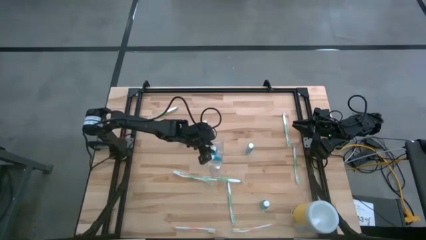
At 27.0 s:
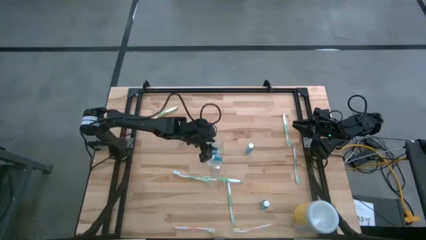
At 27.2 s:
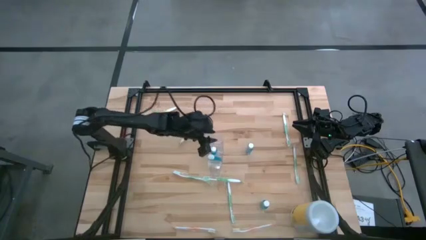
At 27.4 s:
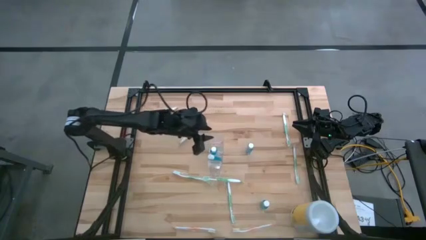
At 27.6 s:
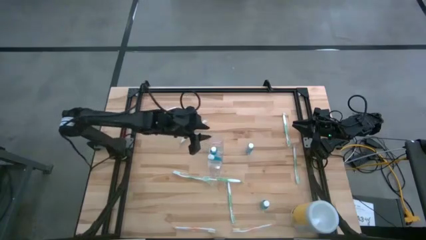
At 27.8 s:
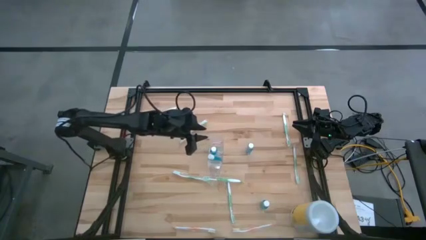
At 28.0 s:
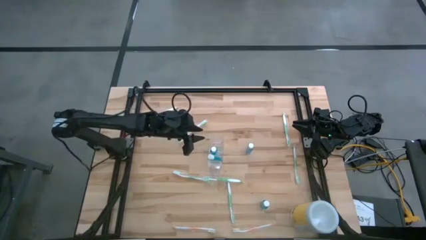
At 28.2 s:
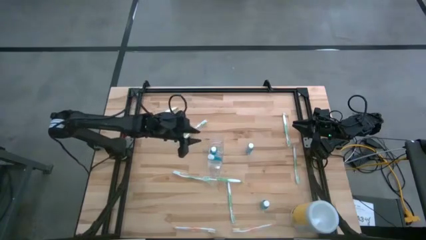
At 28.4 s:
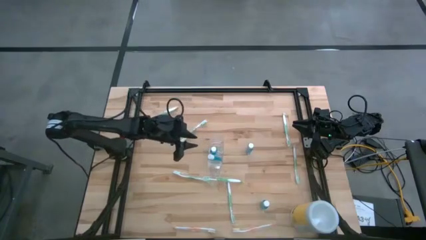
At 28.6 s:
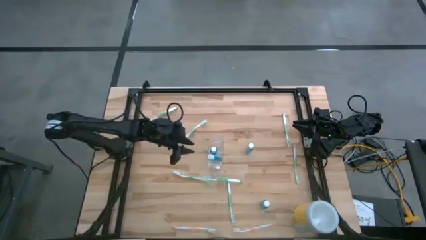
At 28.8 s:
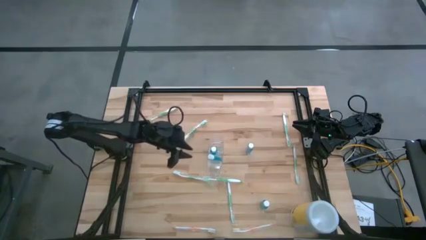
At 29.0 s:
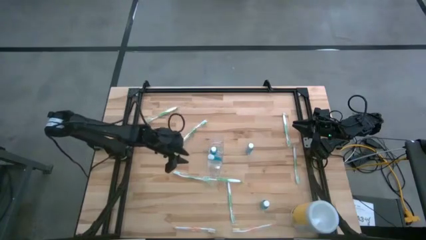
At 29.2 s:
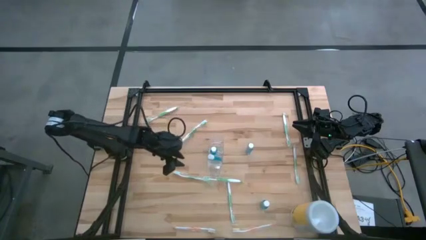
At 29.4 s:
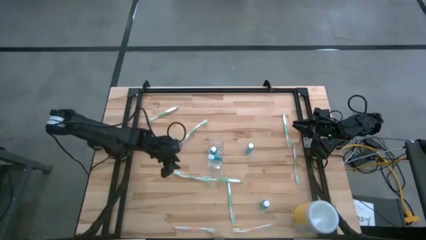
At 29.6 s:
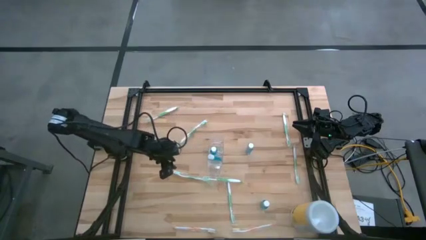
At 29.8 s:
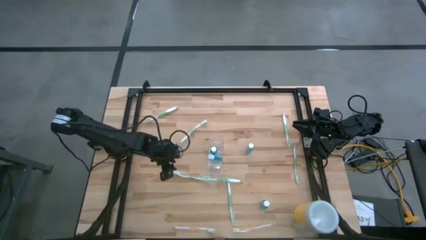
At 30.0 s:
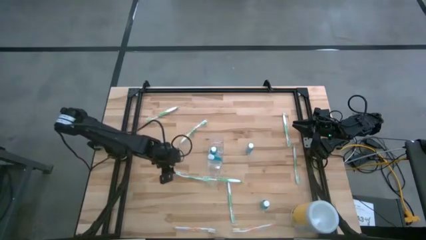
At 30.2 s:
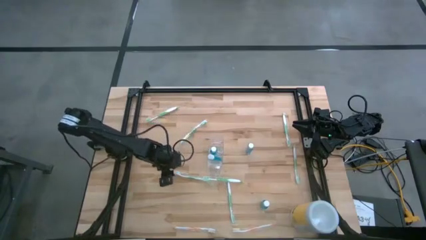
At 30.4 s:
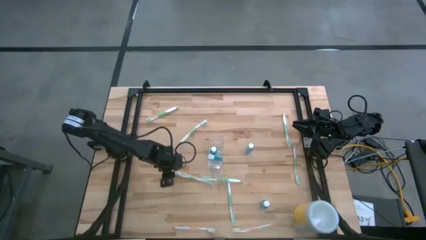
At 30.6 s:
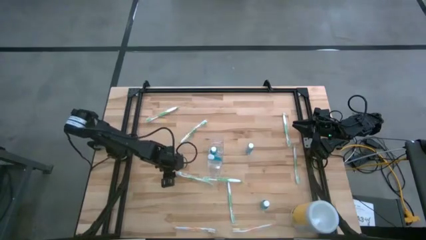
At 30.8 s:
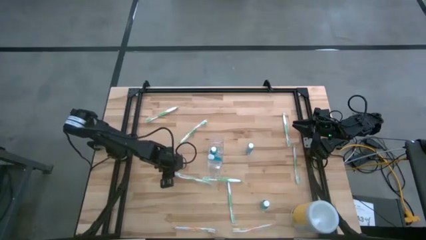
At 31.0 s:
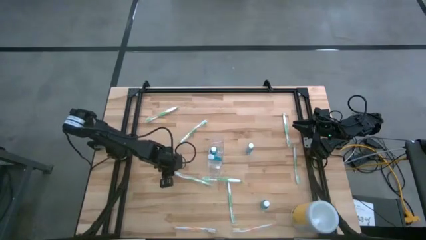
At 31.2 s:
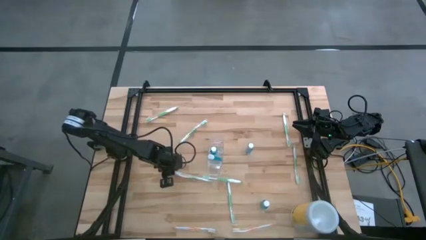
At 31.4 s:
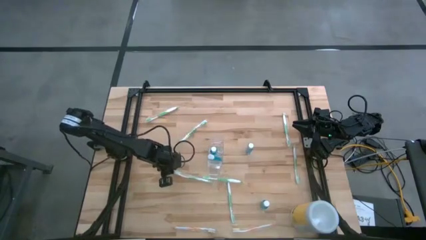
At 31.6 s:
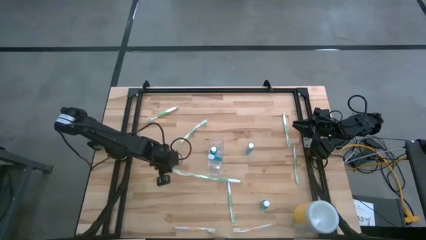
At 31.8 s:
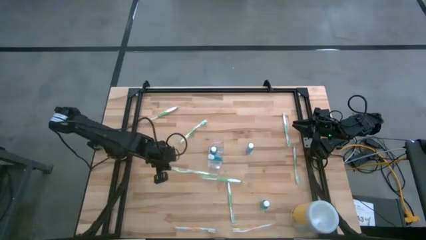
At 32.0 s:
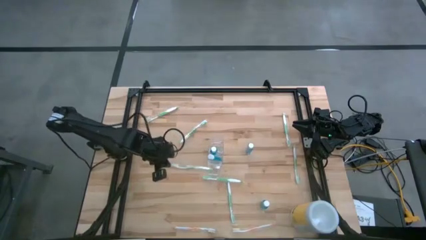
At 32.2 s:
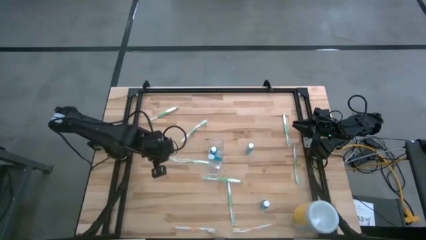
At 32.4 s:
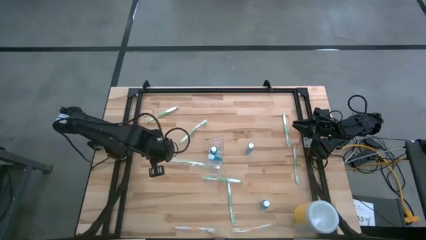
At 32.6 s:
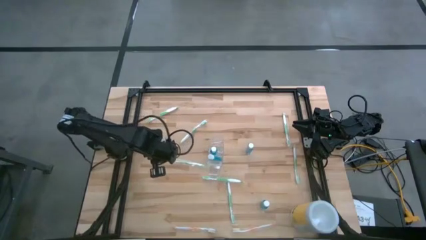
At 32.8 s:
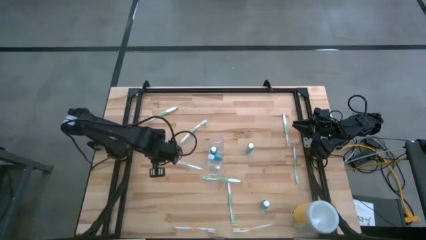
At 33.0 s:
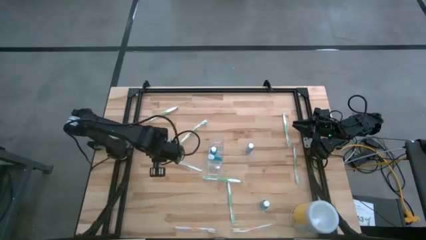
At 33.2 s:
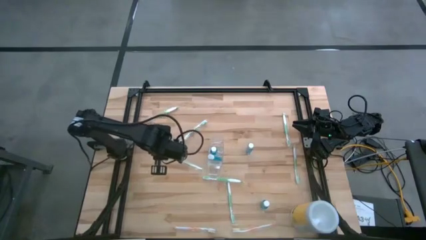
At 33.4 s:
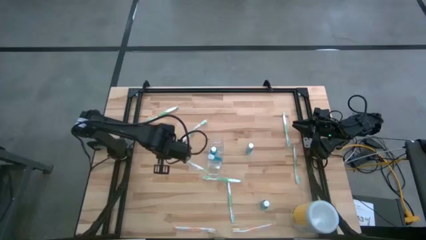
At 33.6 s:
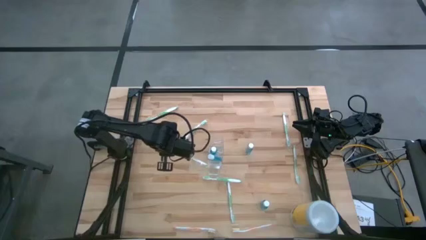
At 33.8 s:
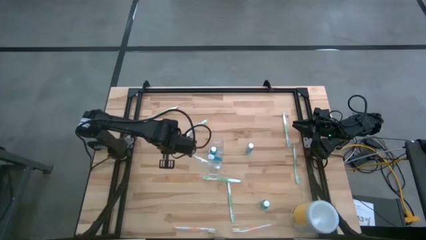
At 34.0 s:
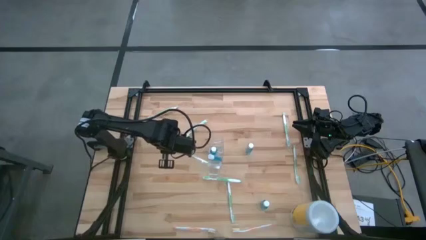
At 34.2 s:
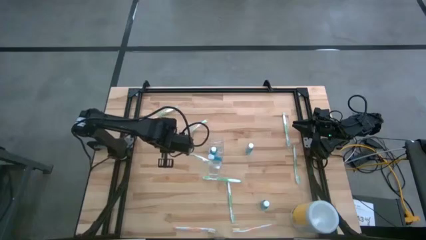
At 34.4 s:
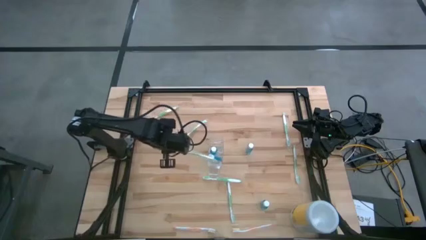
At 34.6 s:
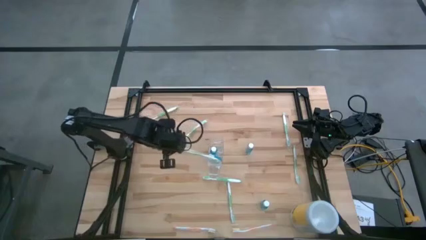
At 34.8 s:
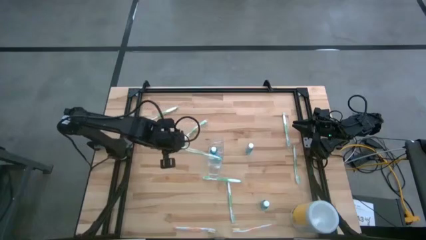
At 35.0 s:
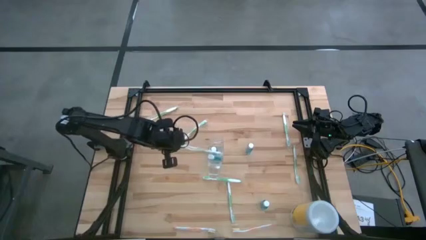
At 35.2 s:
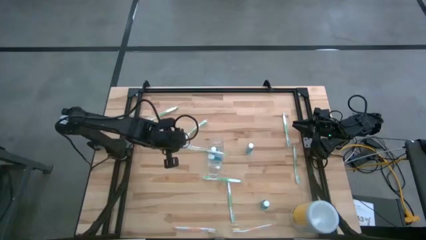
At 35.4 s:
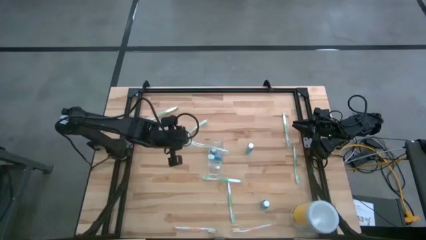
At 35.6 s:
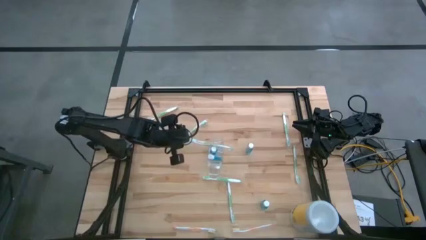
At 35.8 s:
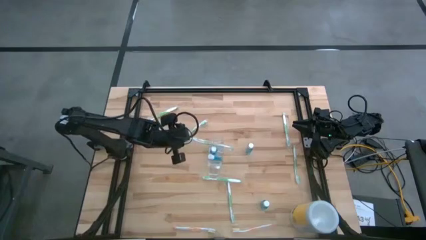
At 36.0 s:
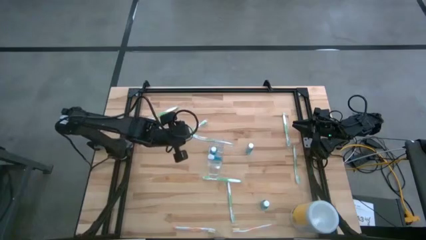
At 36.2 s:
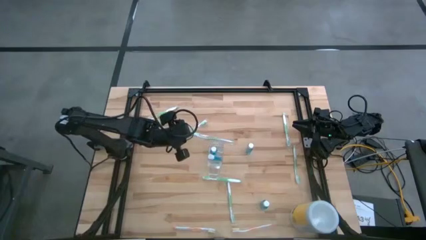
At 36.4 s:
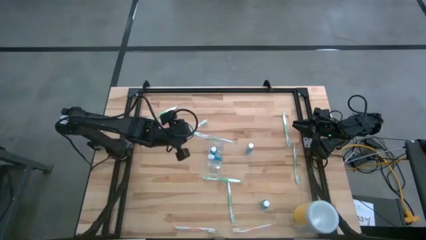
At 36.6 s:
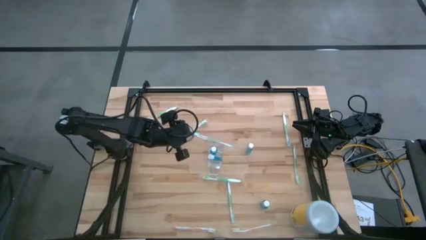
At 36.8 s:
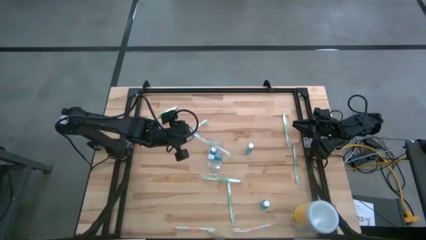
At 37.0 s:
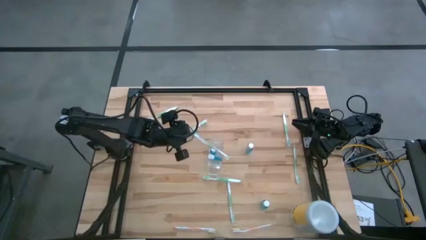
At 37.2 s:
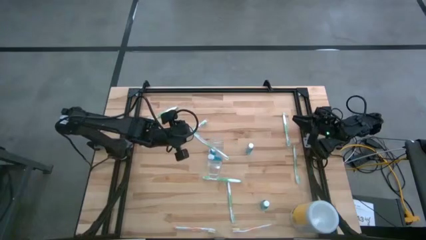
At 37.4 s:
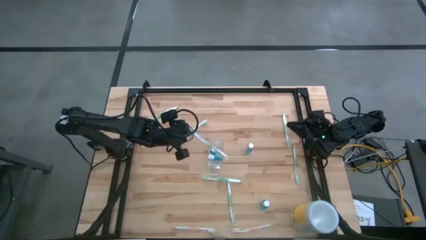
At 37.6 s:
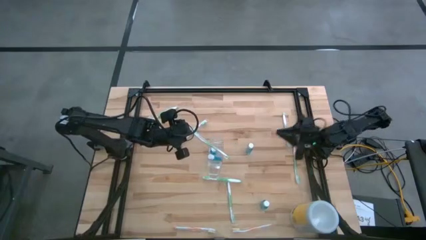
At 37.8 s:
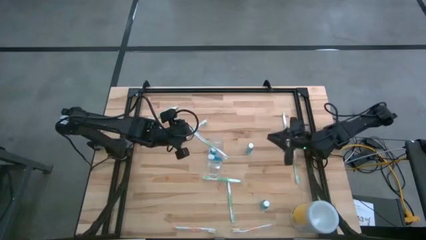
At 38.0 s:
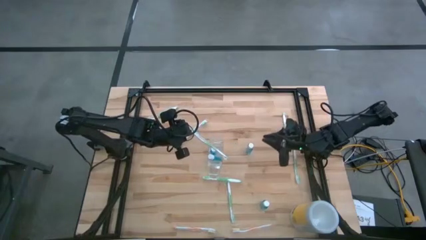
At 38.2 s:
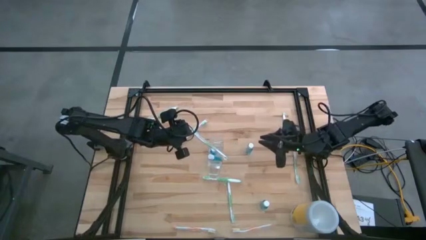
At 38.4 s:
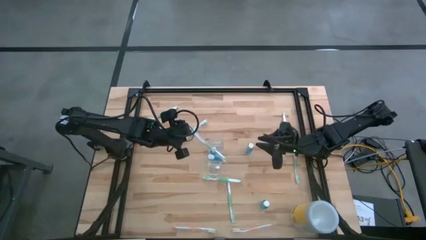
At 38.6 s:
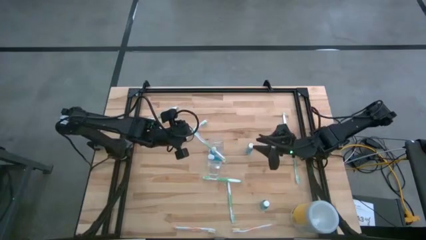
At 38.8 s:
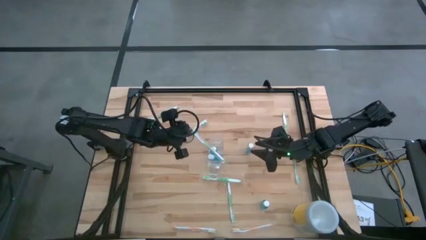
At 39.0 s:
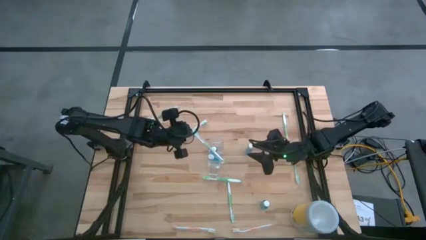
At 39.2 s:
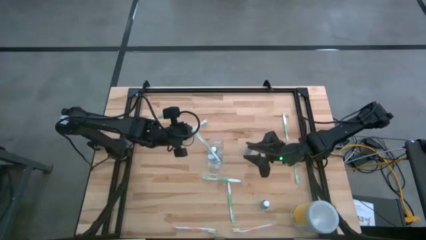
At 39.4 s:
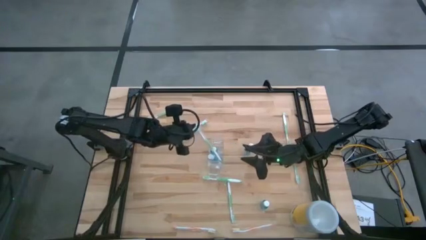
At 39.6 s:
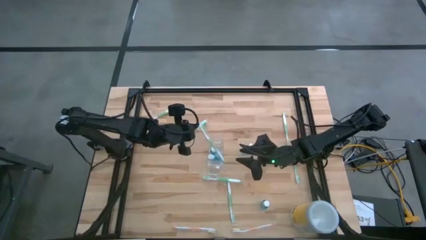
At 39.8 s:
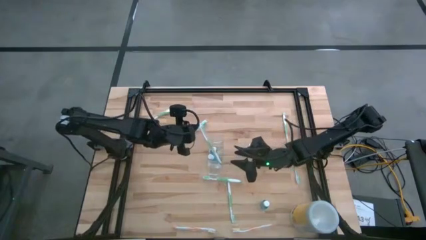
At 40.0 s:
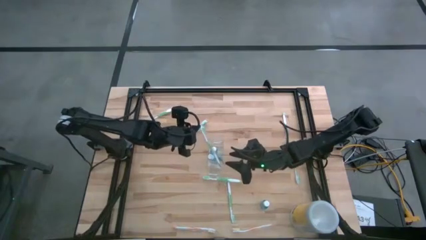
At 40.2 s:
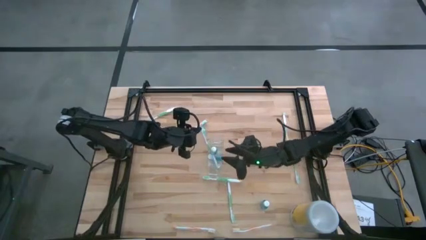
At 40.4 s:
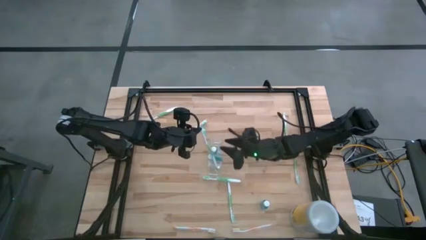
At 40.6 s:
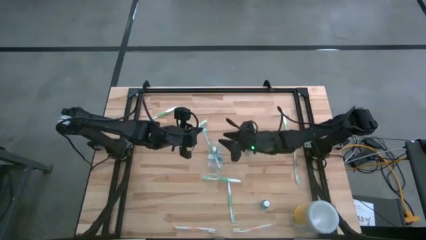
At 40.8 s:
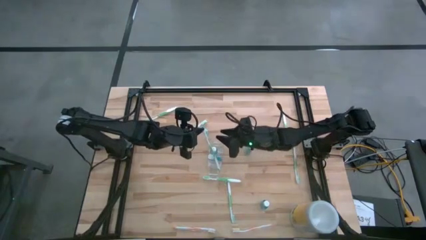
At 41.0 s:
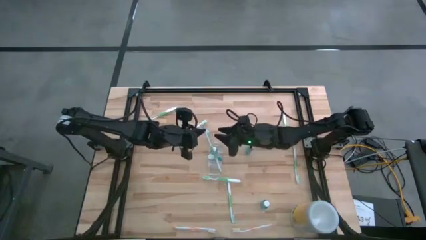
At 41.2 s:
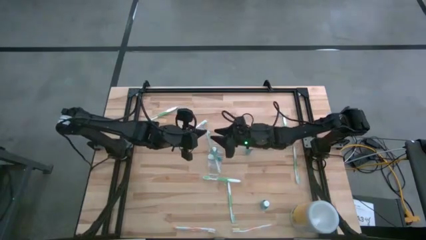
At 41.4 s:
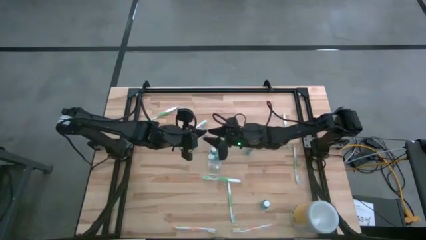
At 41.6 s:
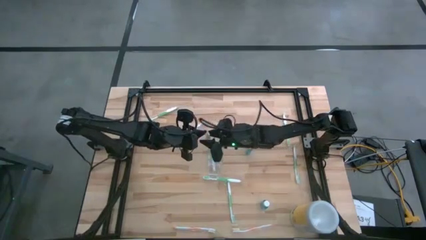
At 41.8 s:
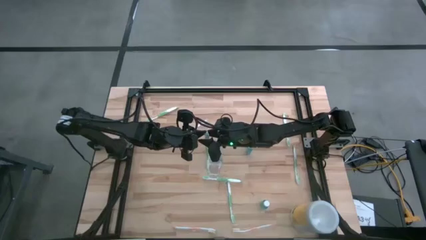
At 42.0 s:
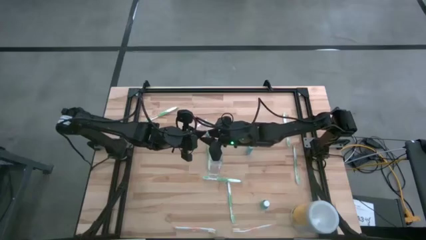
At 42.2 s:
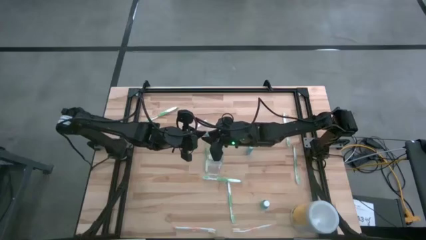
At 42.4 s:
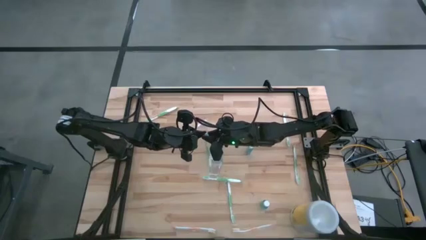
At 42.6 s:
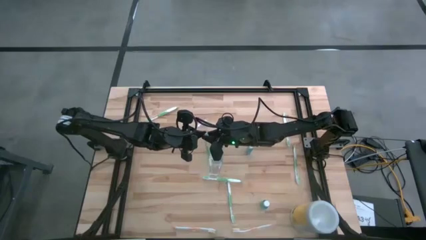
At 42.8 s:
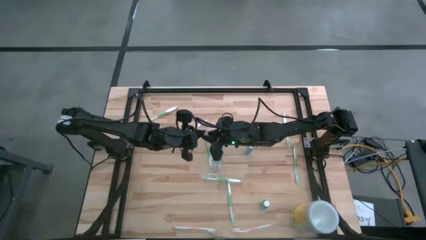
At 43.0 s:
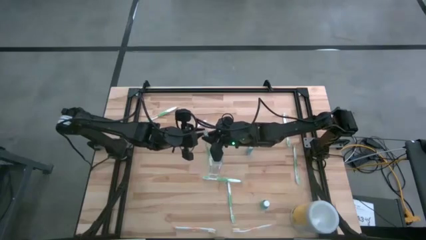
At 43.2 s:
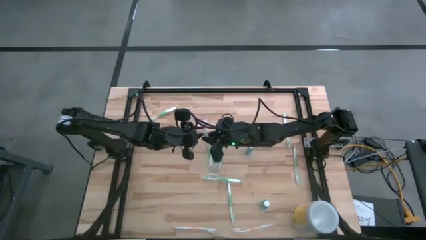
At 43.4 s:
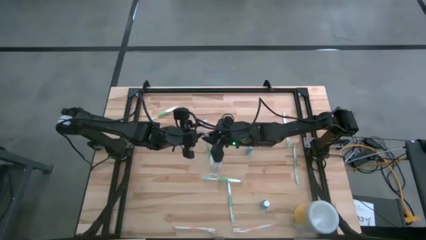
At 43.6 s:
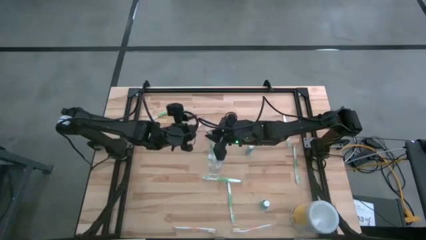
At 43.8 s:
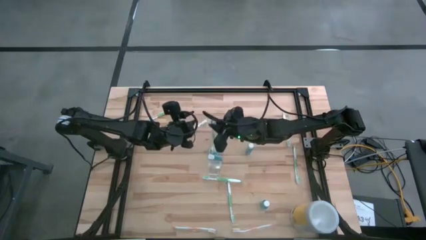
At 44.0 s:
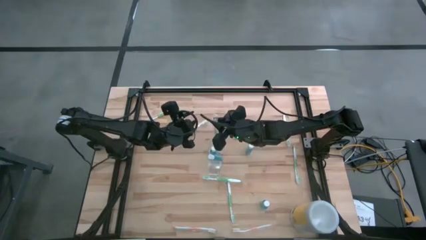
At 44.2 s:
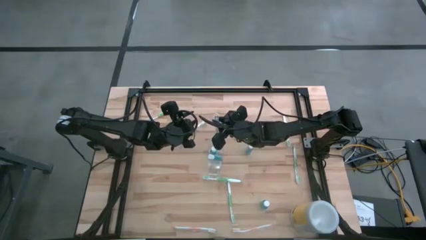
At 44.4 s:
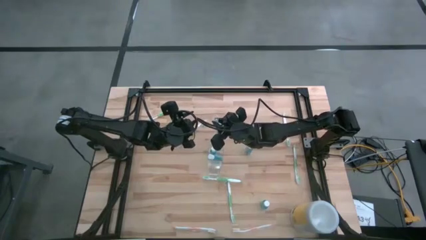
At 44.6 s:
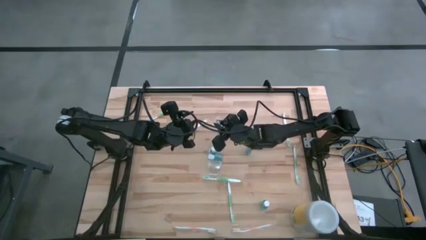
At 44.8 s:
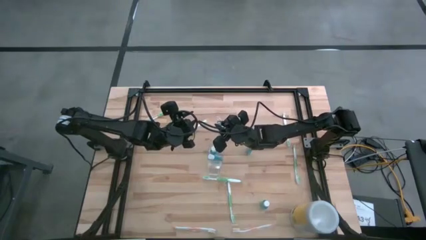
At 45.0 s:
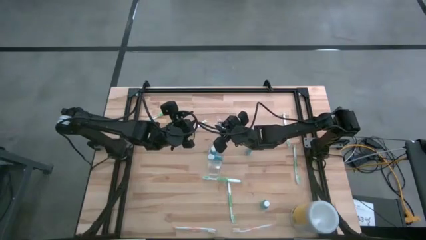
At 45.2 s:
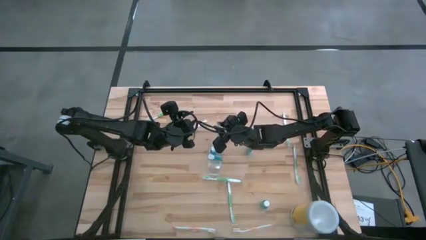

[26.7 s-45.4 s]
Task: Pick & Place toothbrushing station
Put the white green toothbrush into the back side of the transparent organizer
